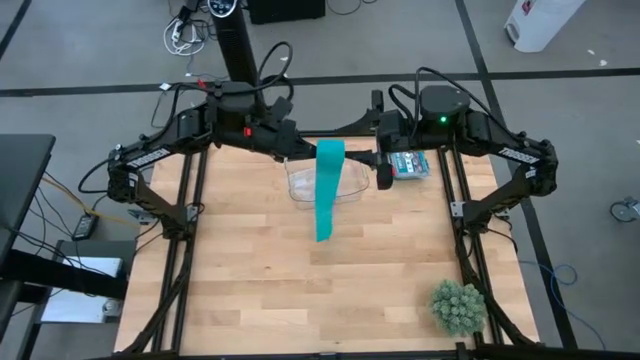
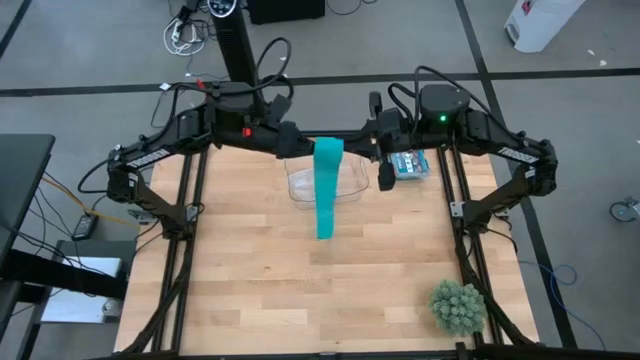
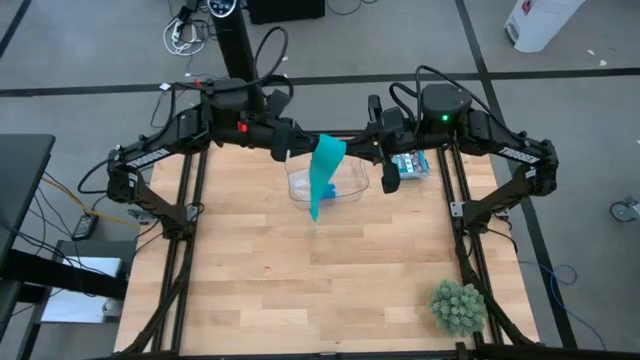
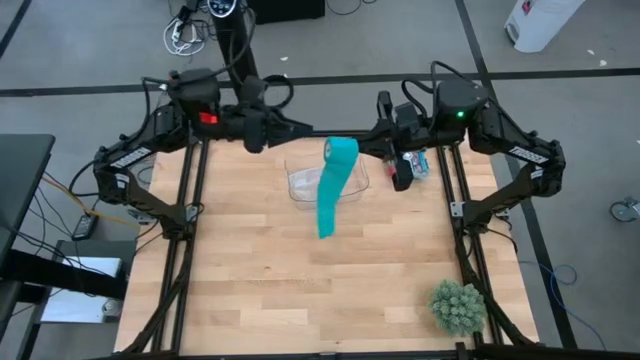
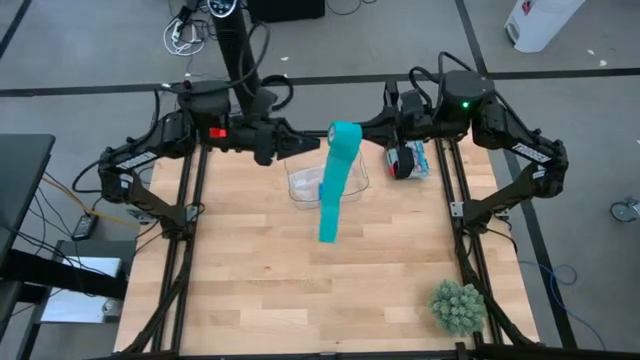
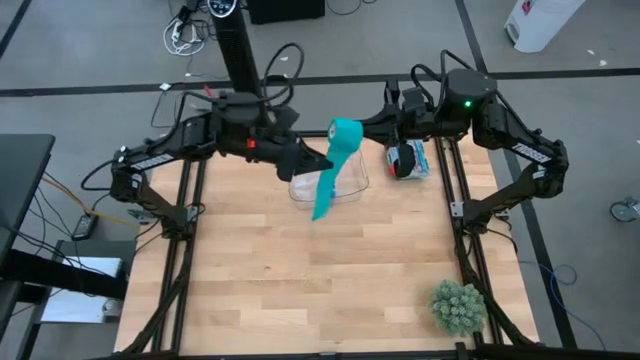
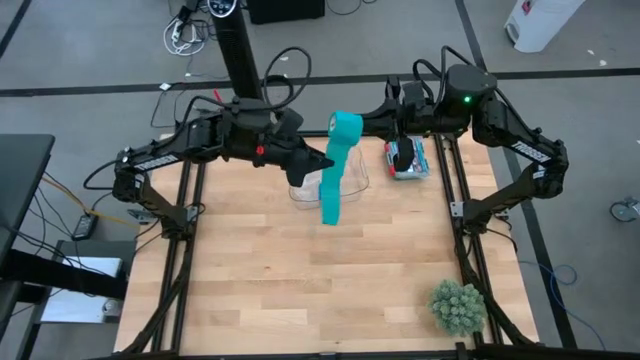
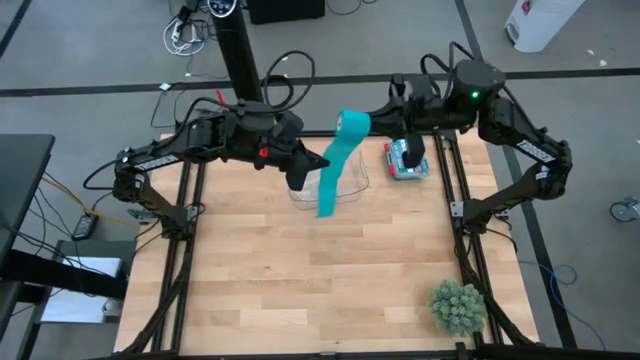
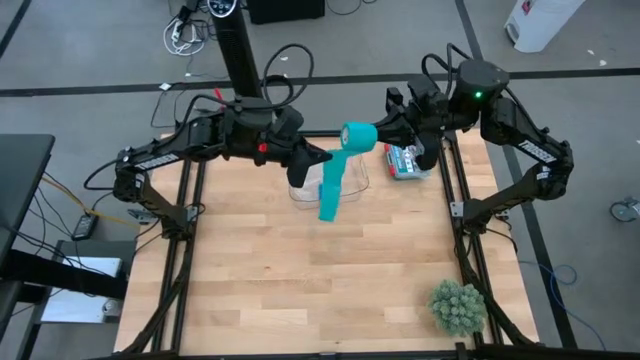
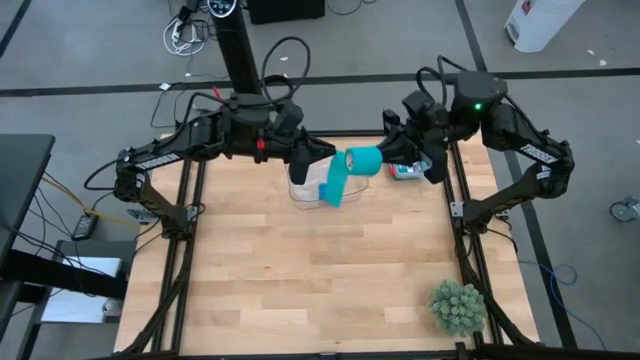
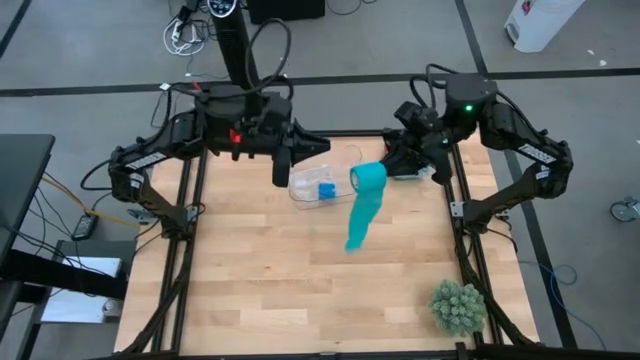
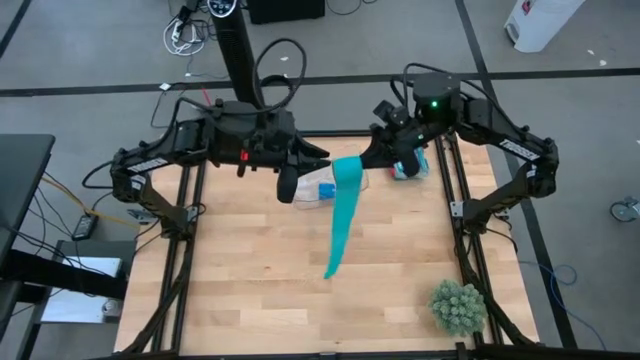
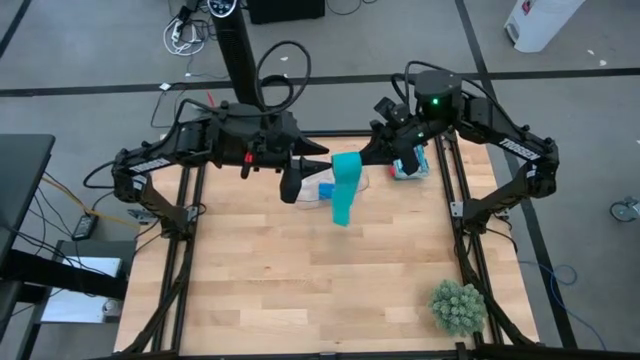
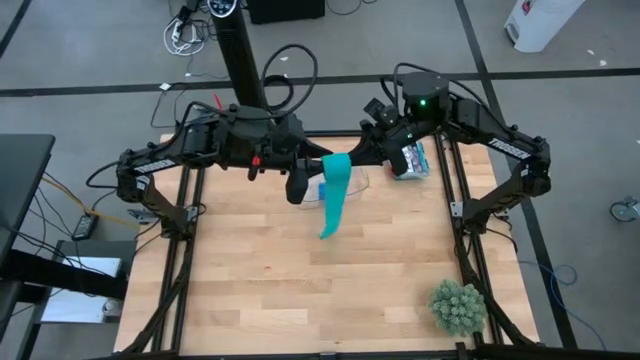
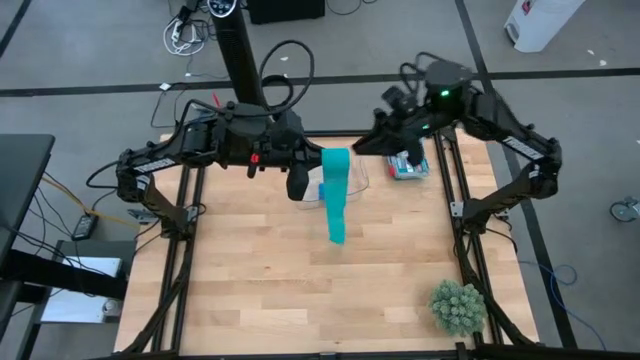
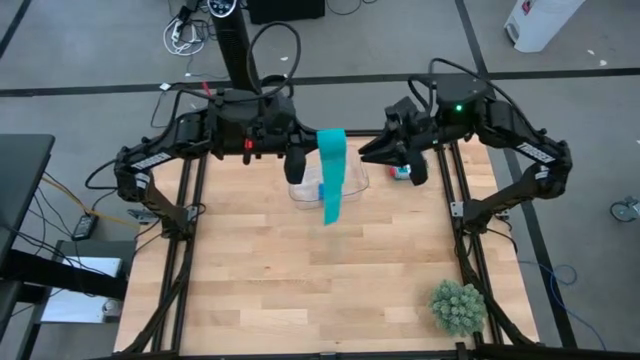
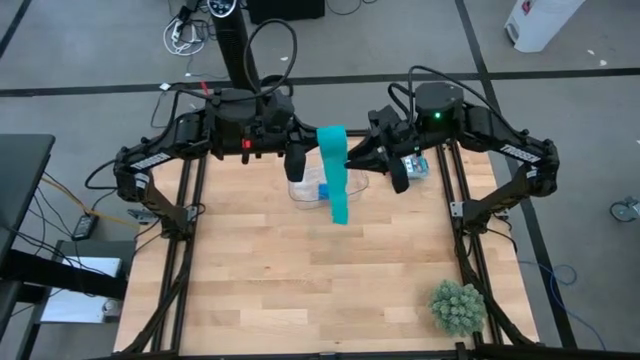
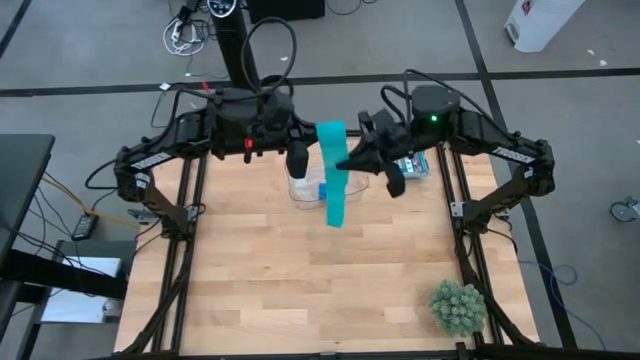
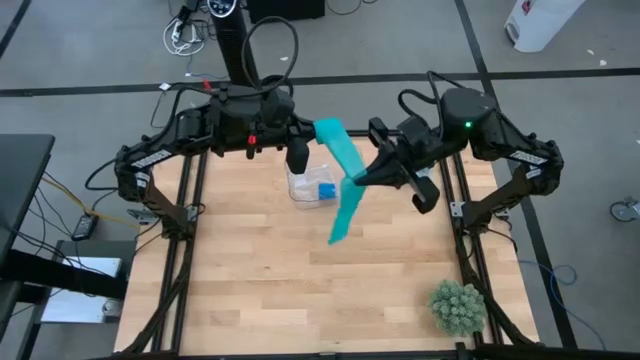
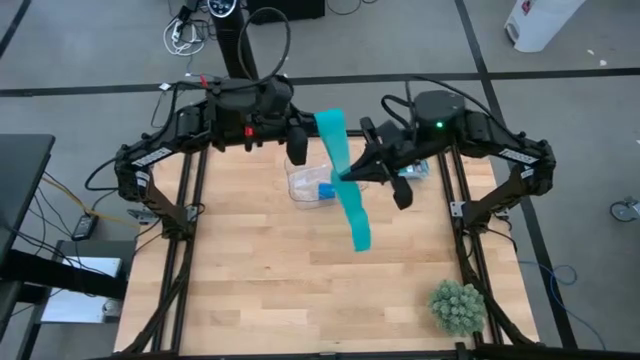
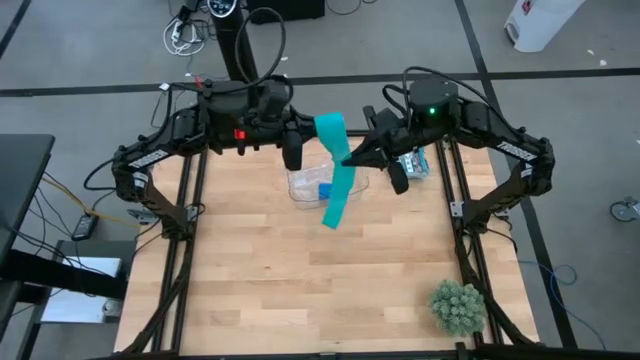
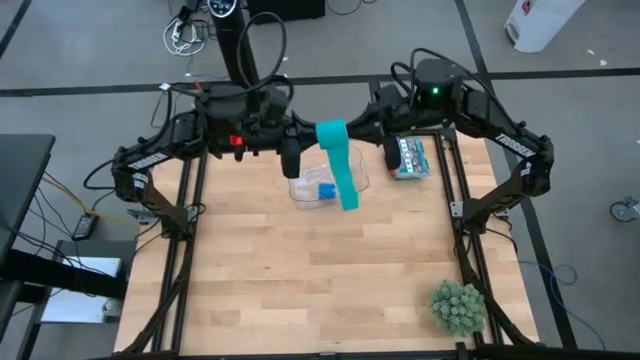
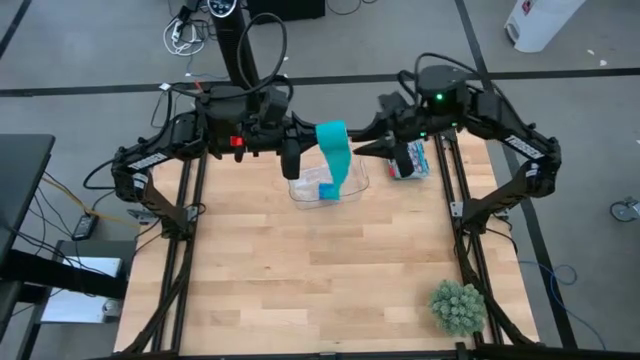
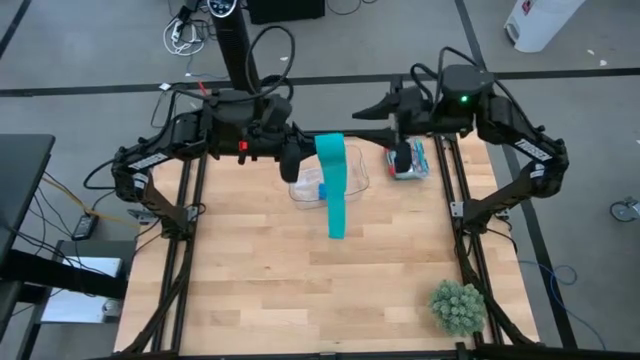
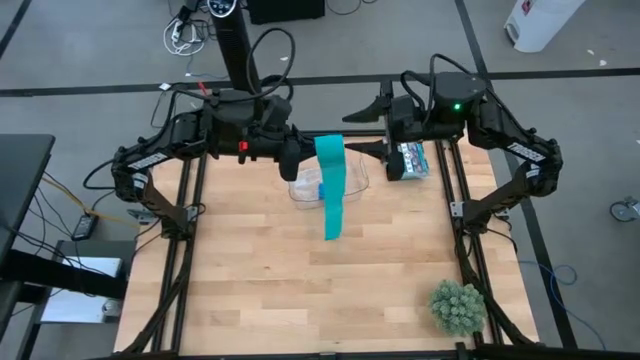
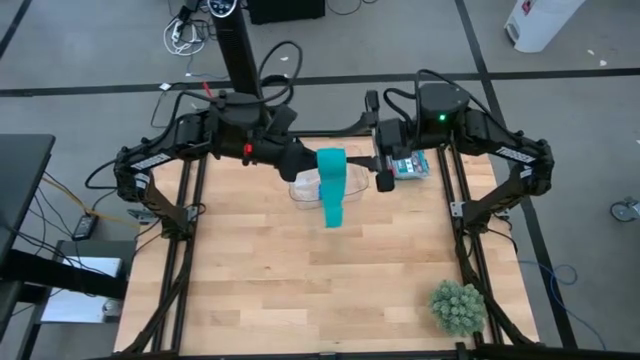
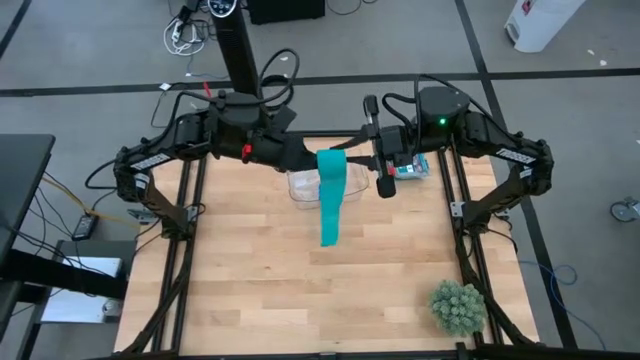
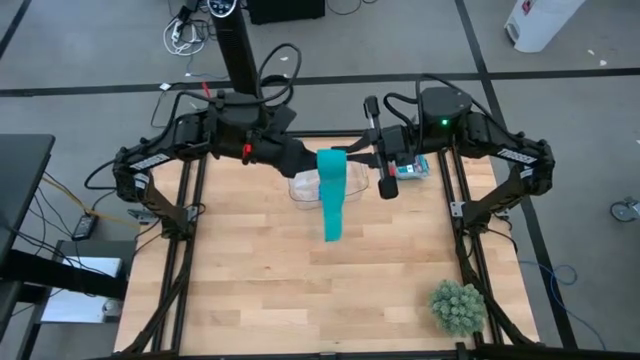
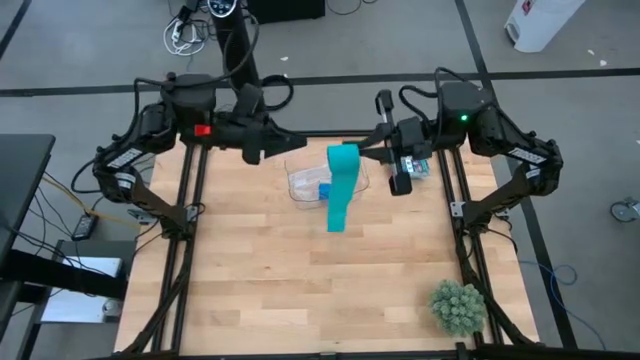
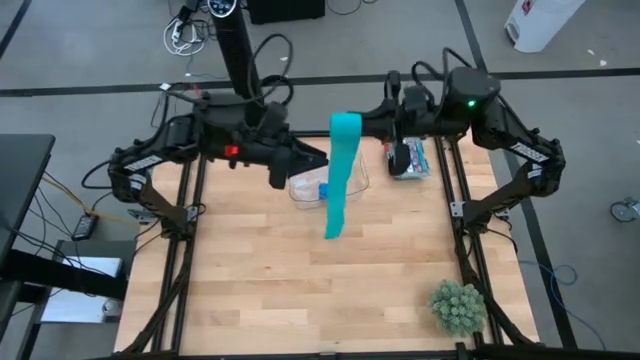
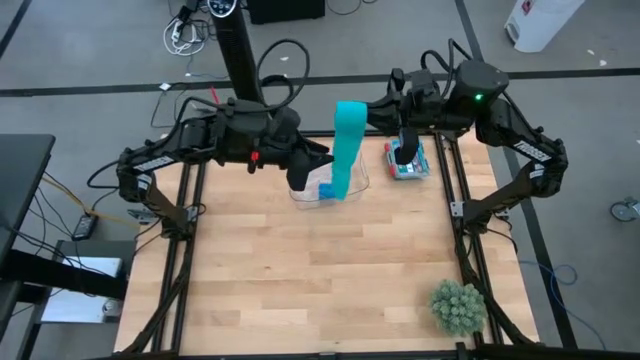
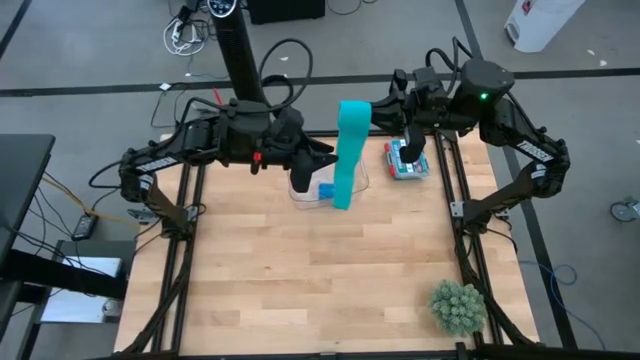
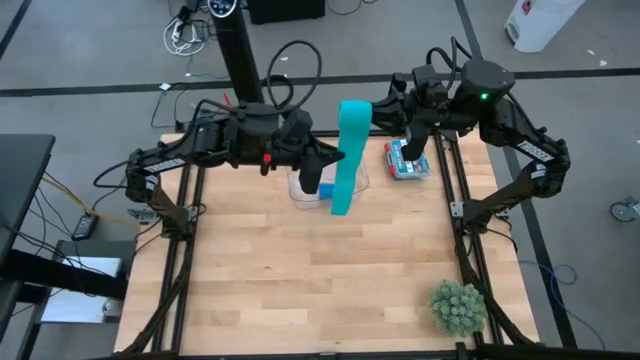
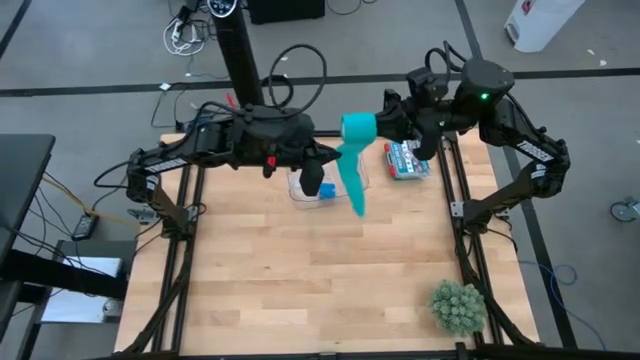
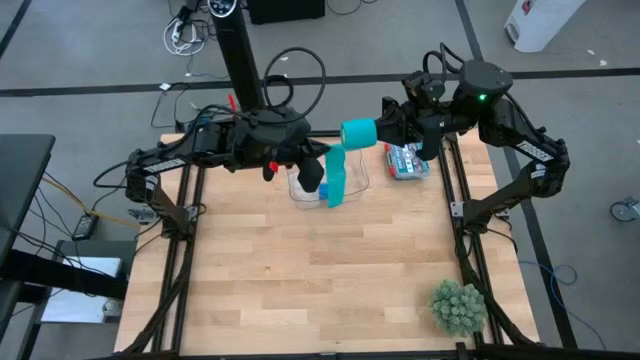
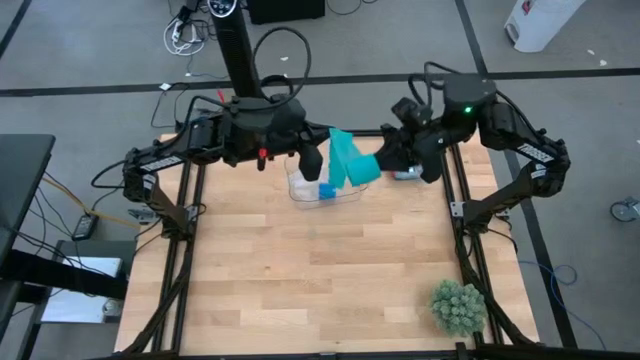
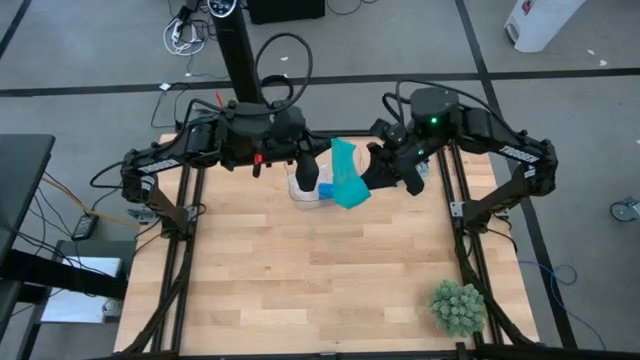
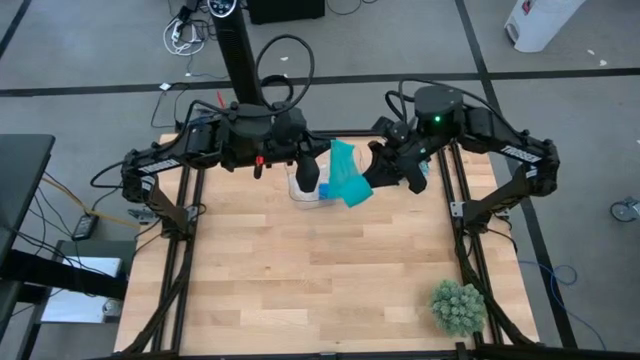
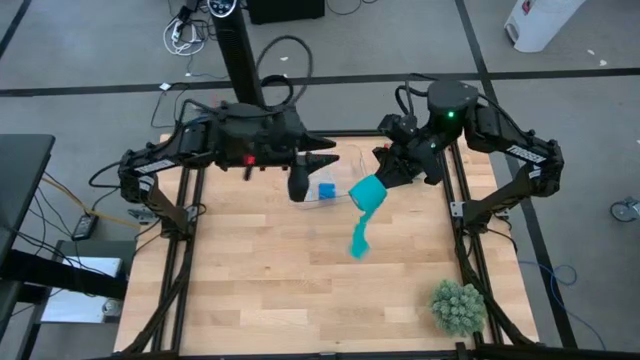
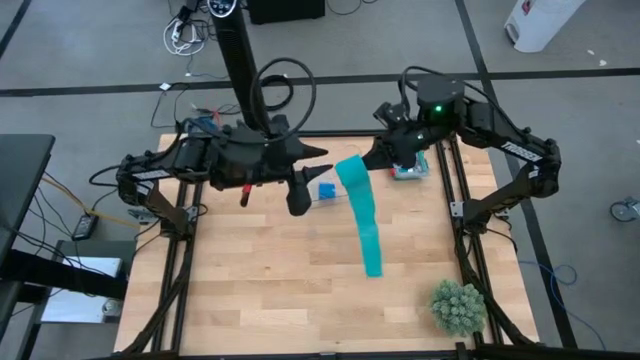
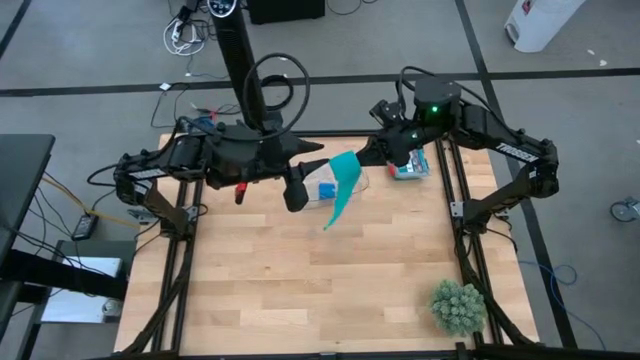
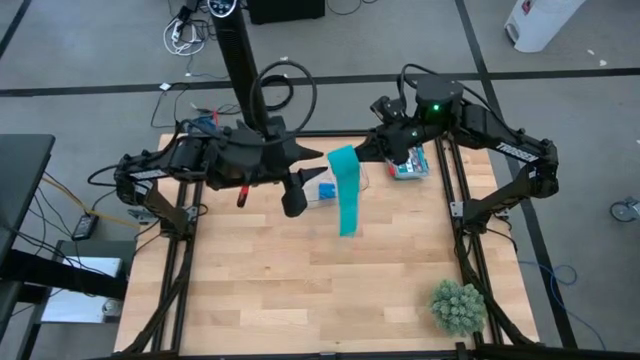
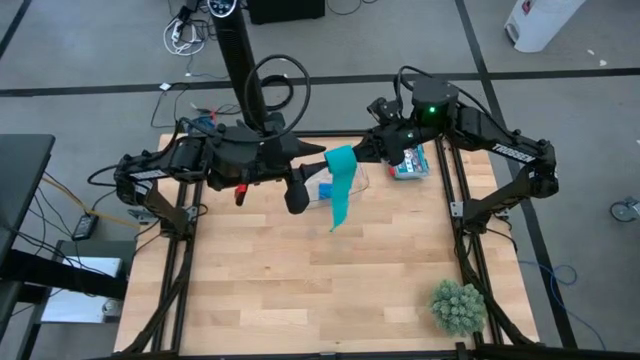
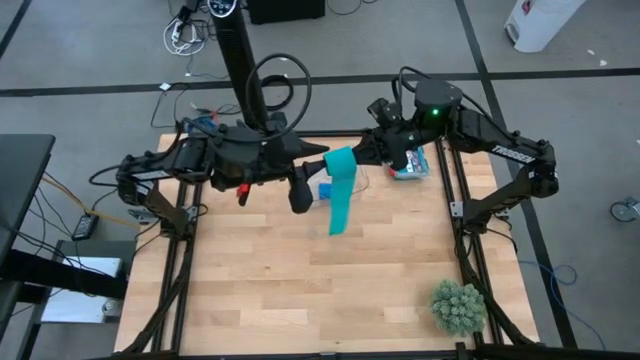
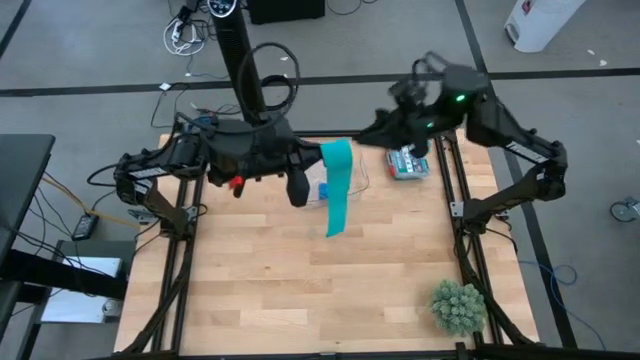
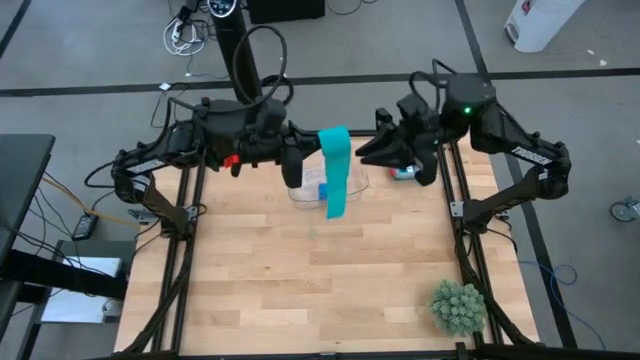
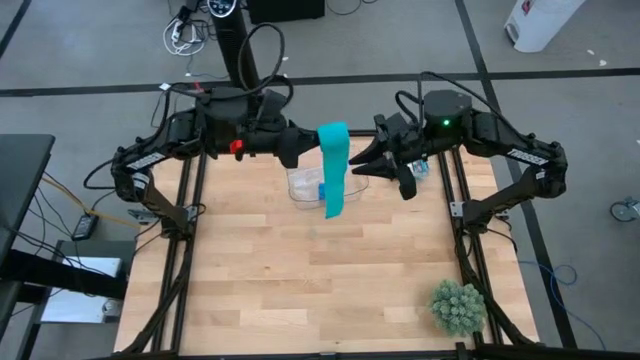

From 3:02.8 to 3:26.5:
Task: Roll bandage
Roll the sky blue bandage
